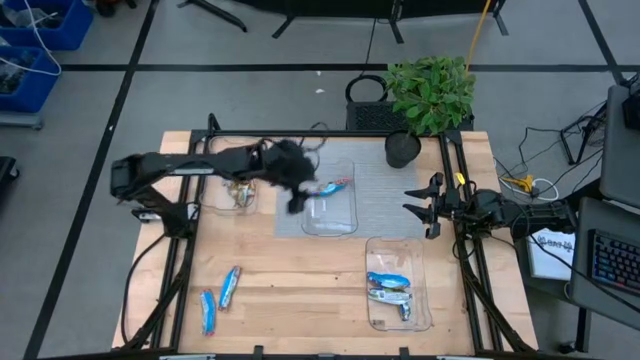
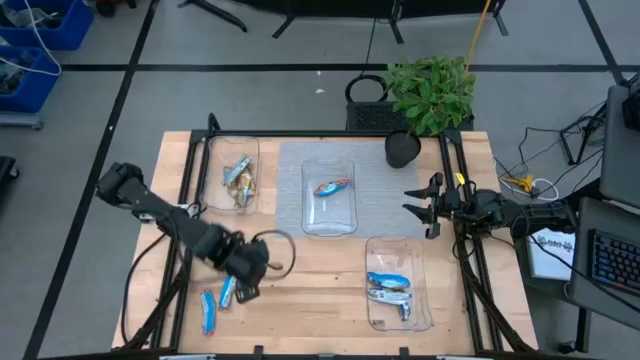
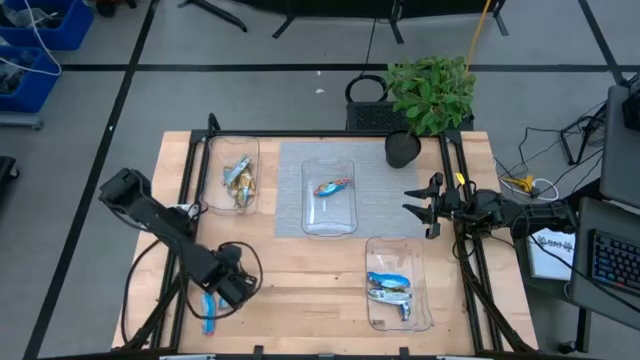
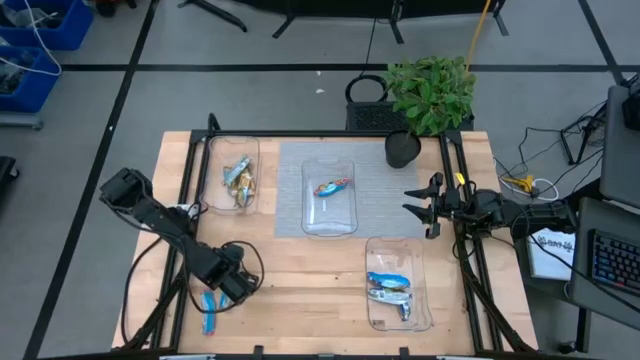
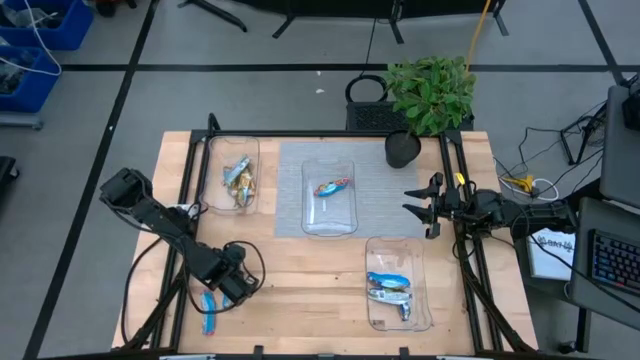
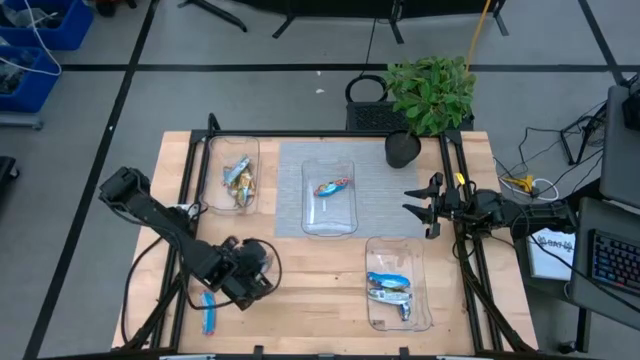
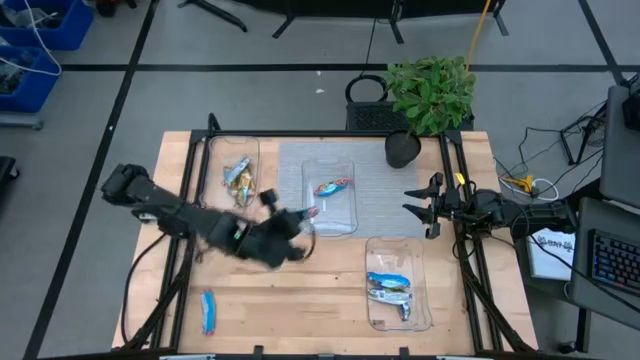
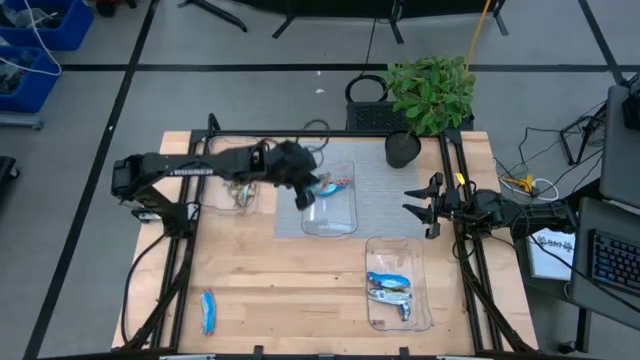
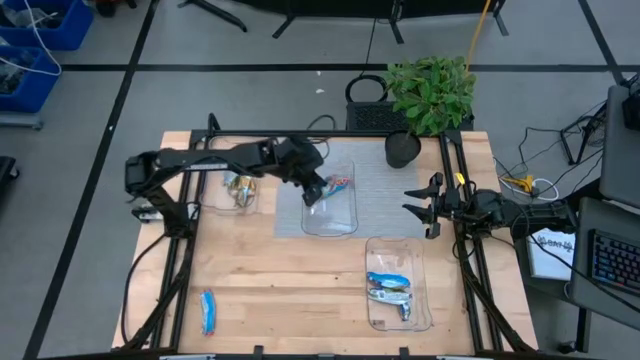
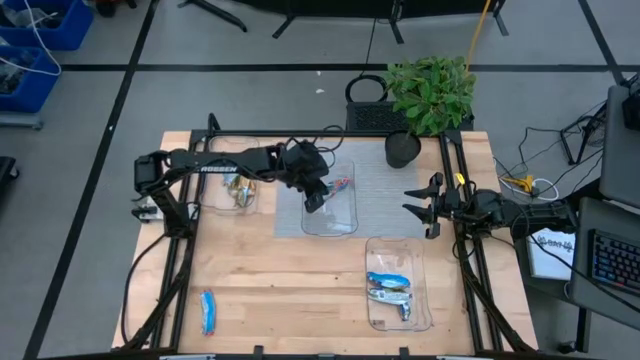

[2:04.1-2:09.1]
Task: Pick and place Granola Bars by type
Put the red granola bar into the top right transparent bin

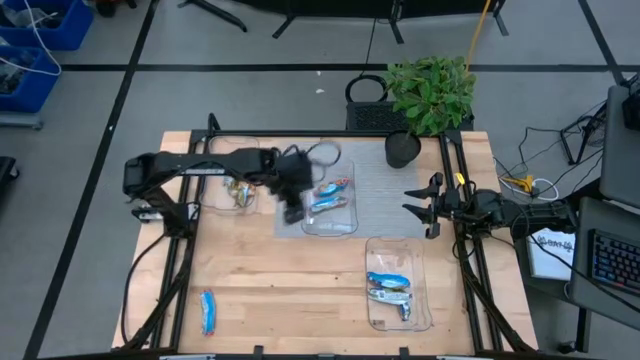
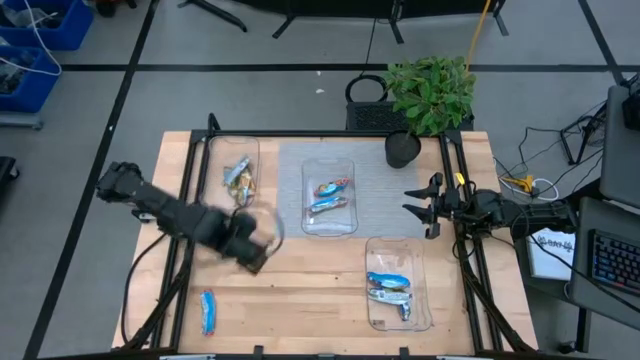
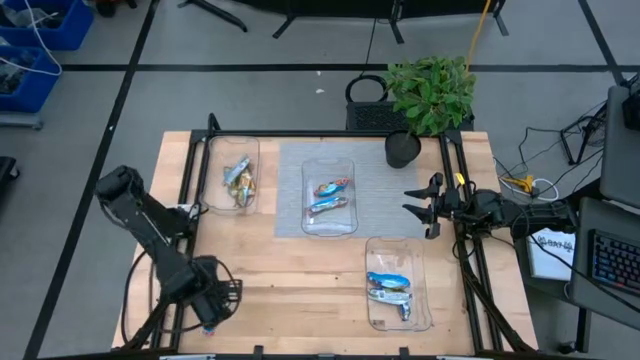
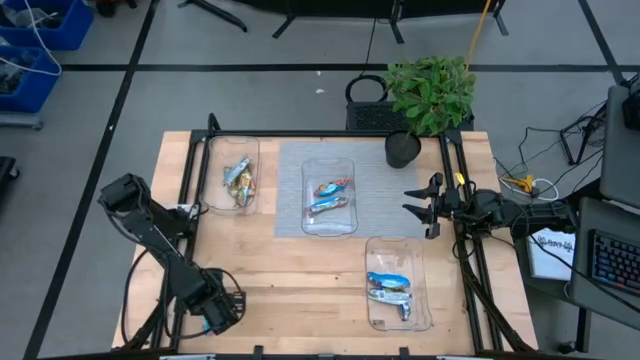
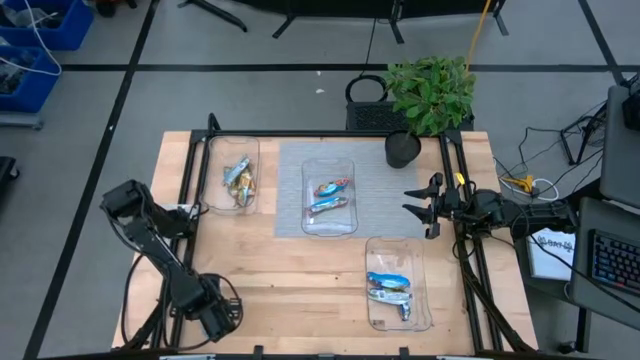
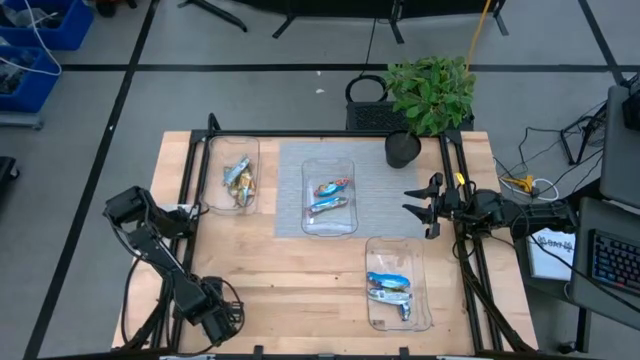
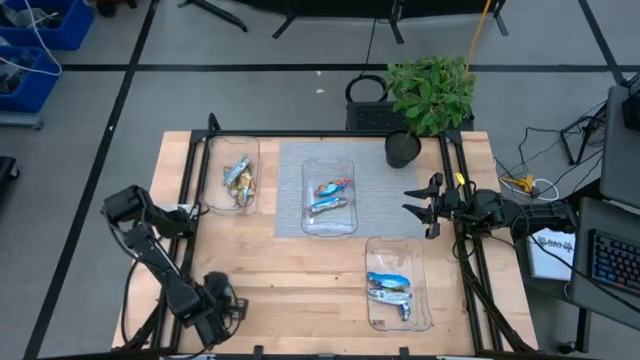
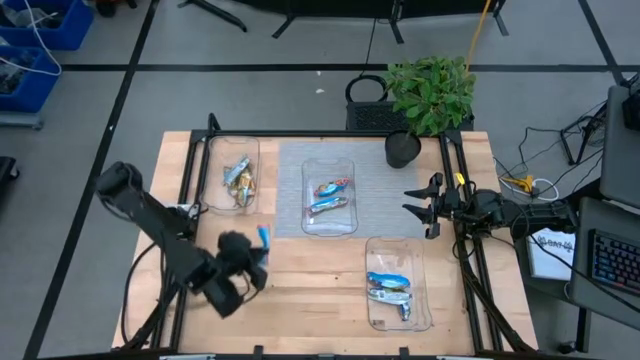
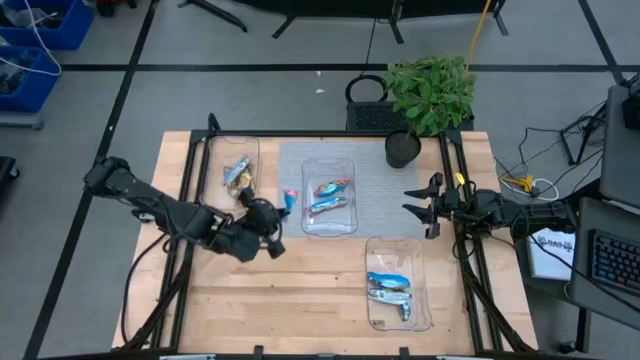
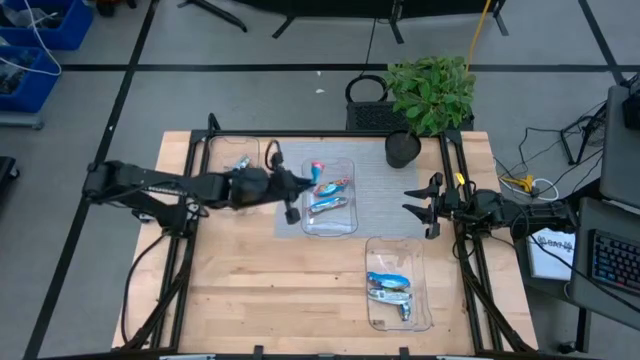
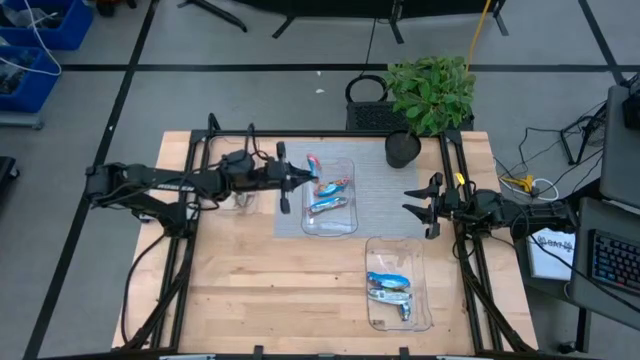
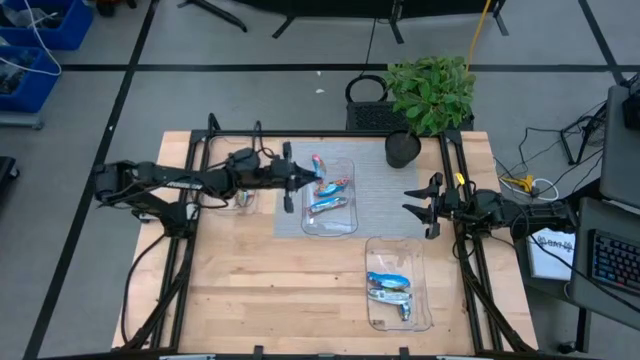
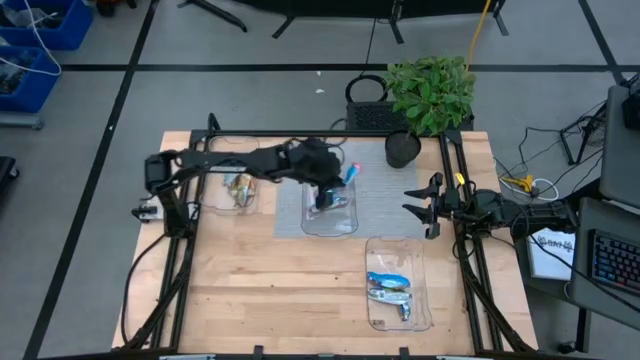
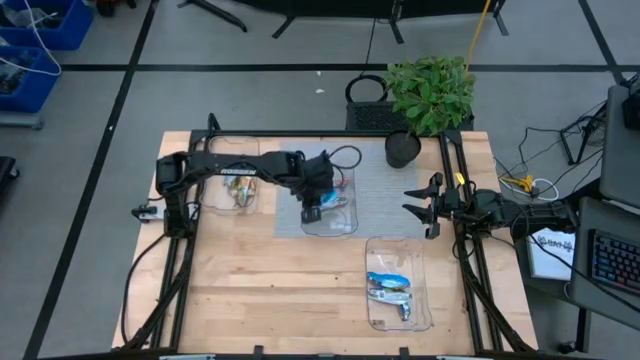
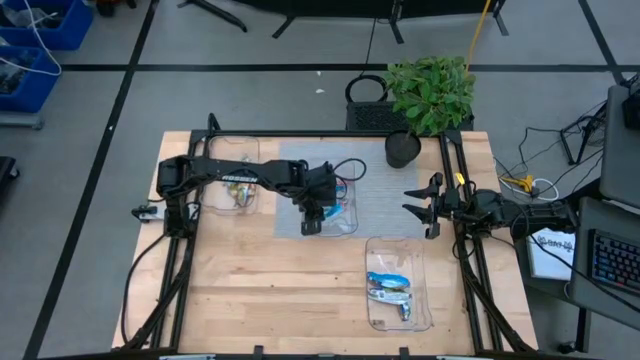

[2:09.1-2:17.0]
Put the red granola bar into the top right transparent bin

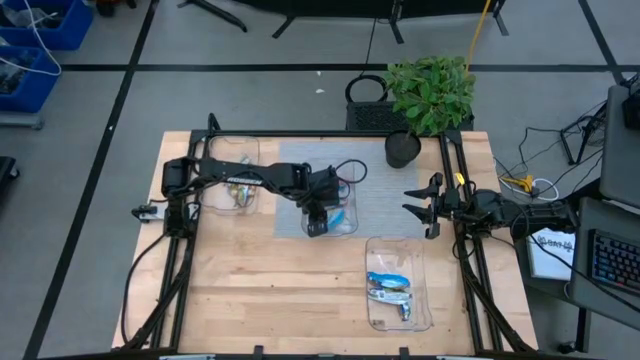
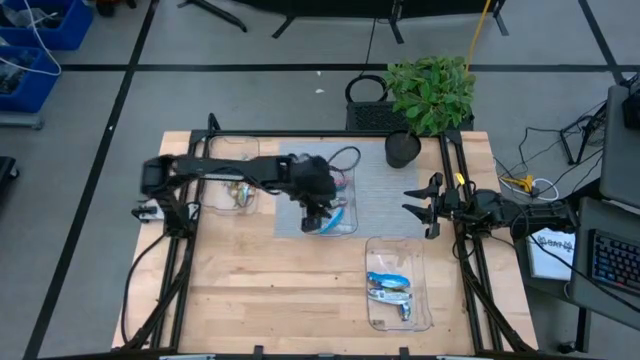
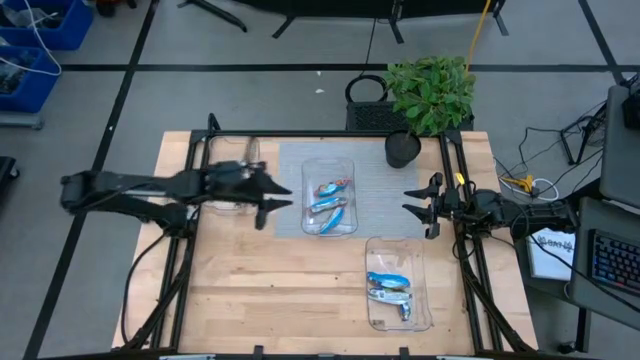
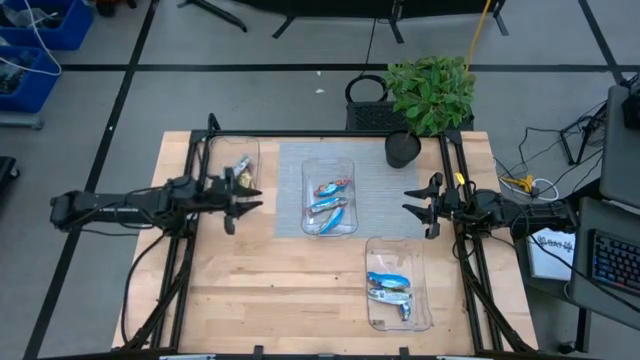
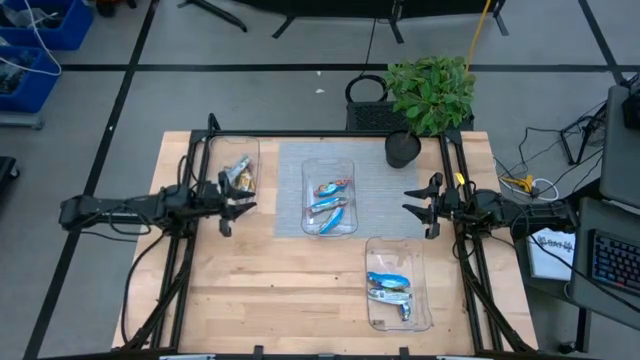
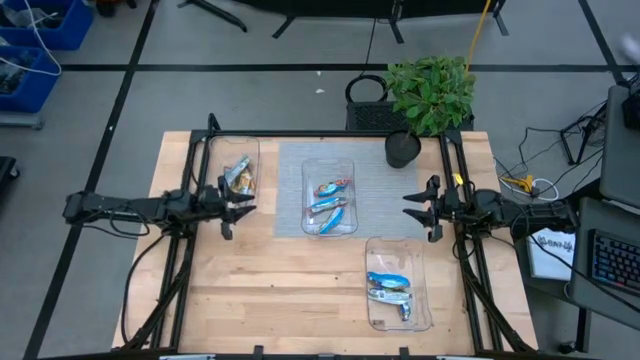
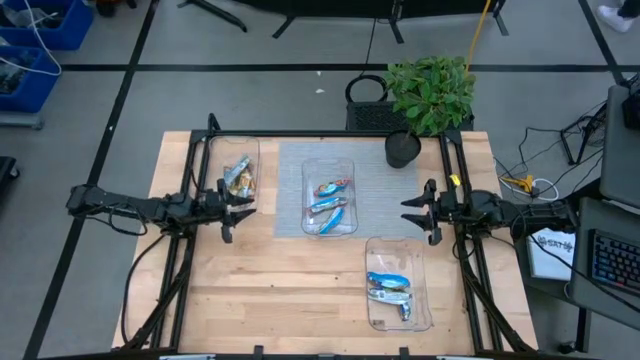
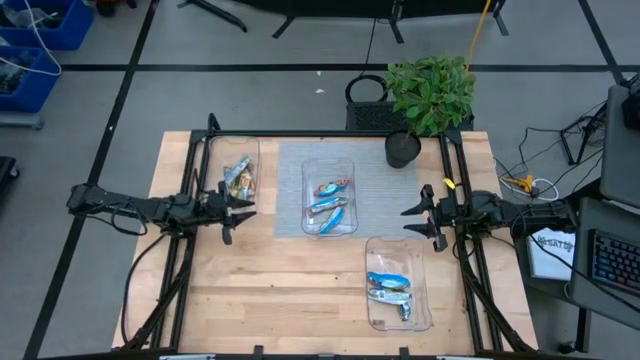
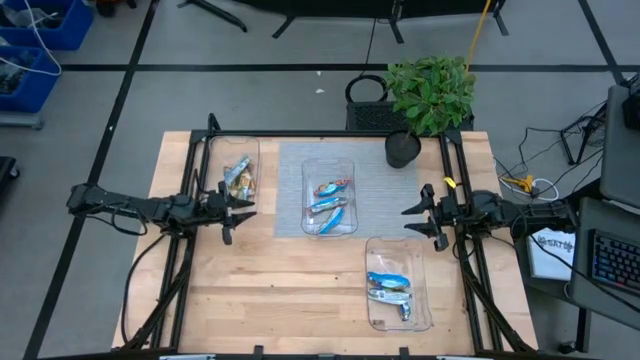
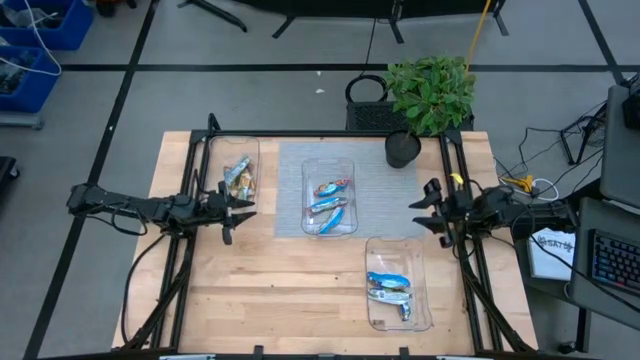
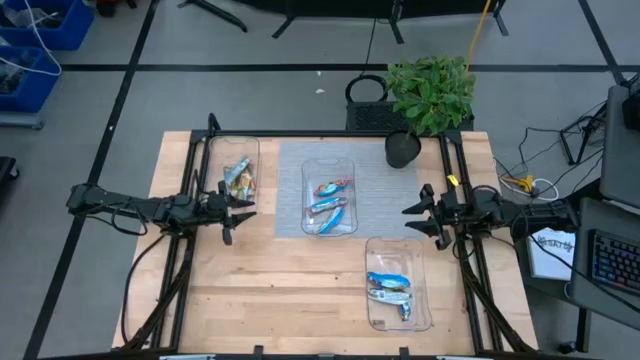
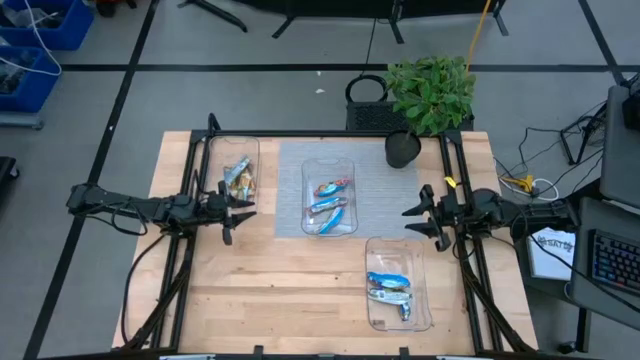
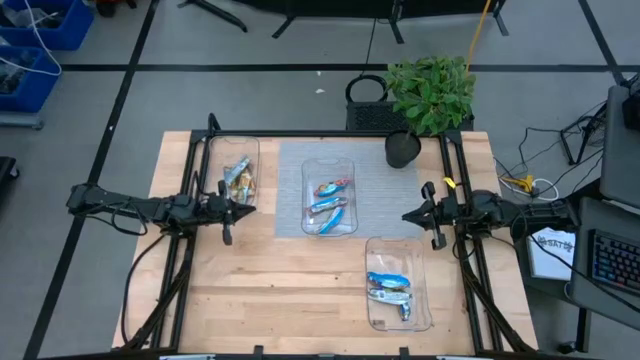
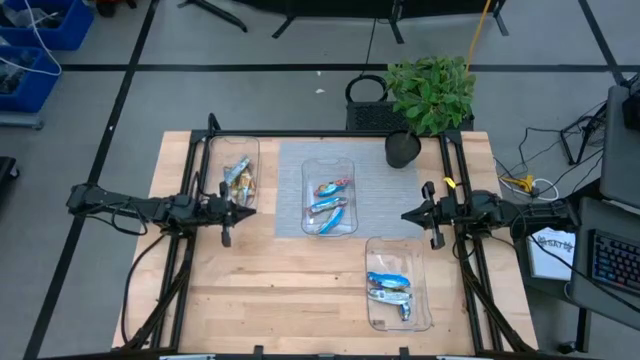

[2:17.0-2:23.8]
Return to Home Position

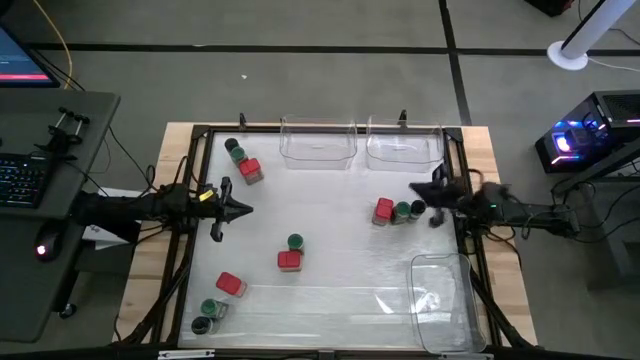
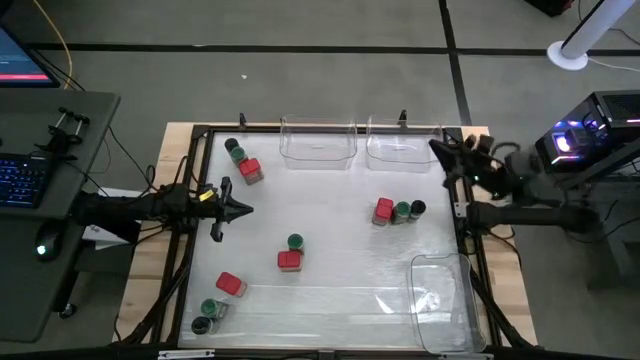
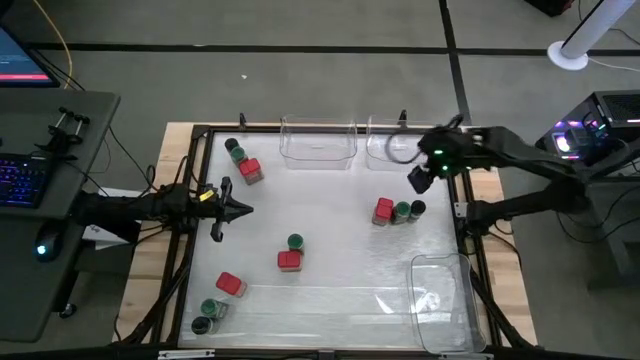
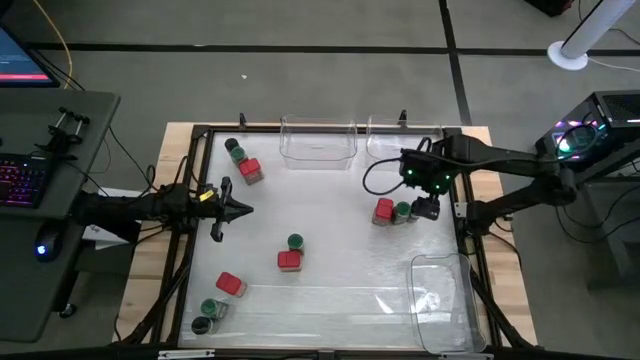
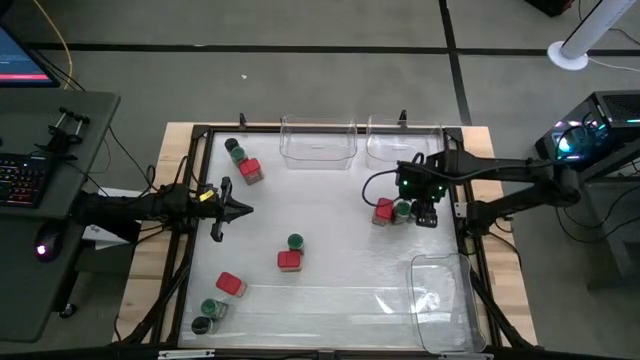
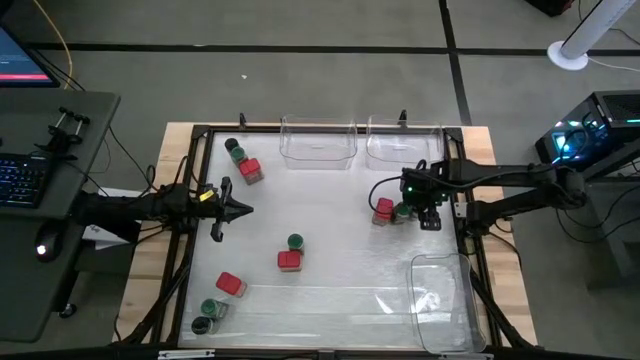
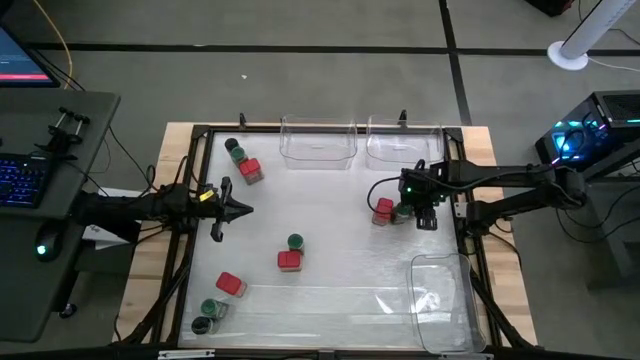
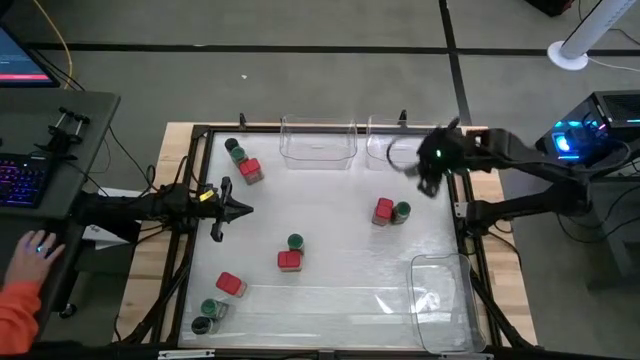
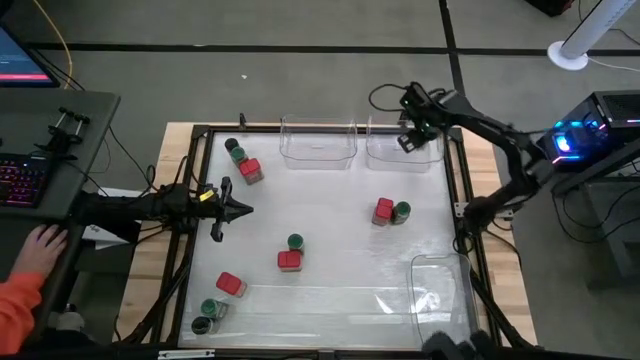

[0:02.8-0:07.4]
Task: Sort spices by type
Put the black seasoning bottle into the top right transparent bin
